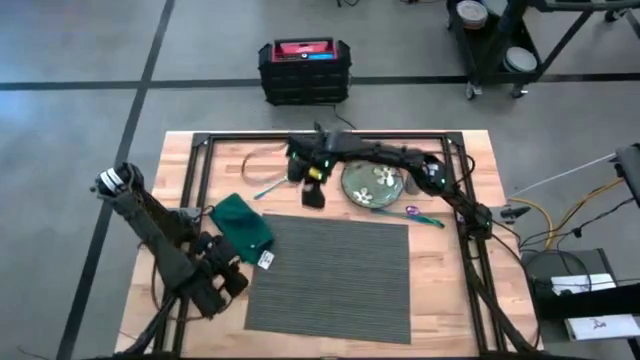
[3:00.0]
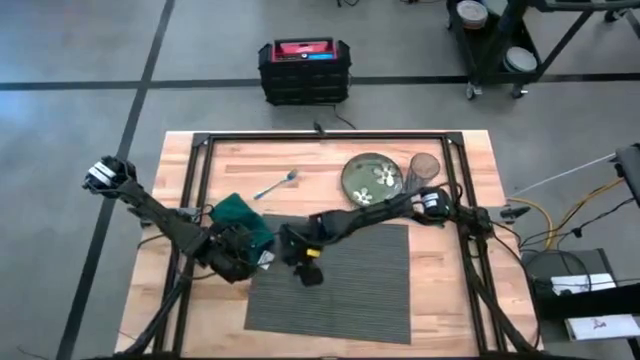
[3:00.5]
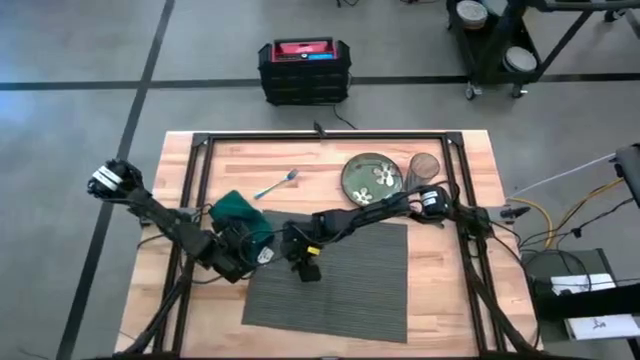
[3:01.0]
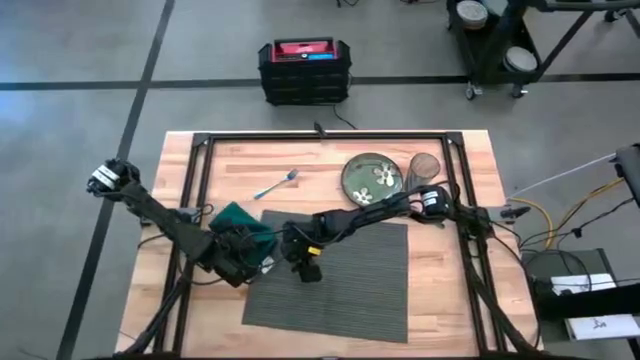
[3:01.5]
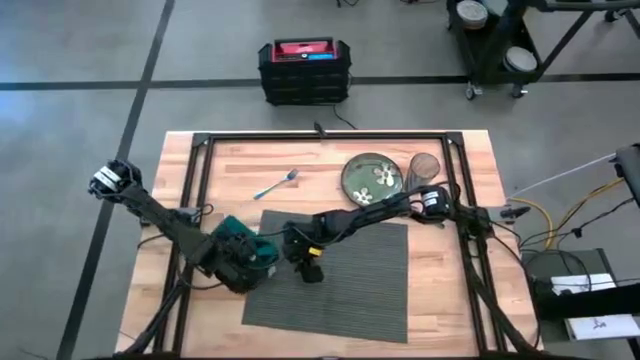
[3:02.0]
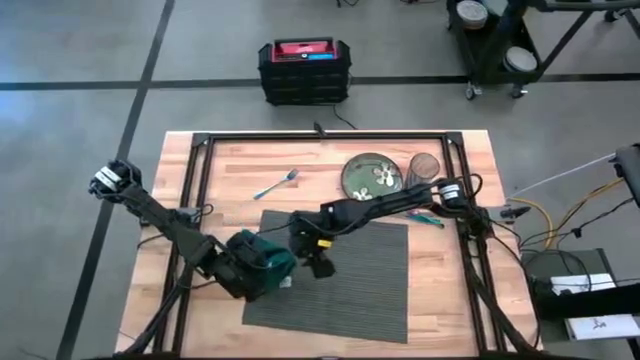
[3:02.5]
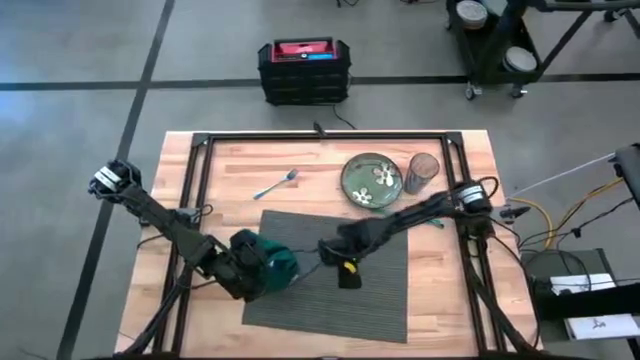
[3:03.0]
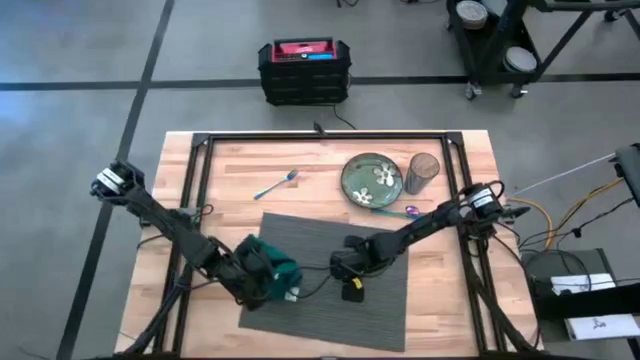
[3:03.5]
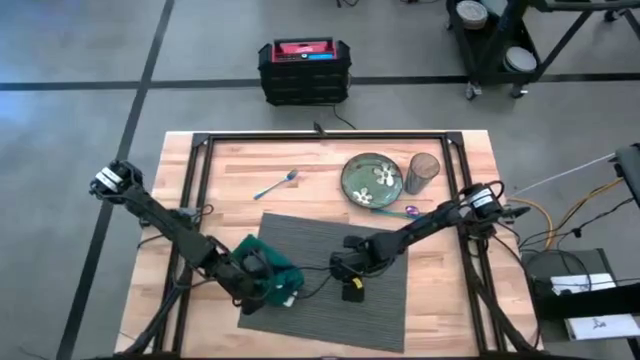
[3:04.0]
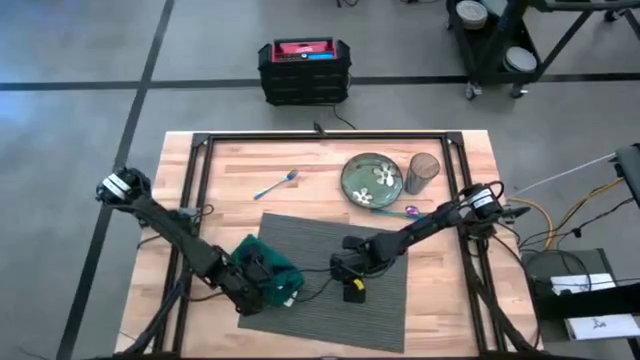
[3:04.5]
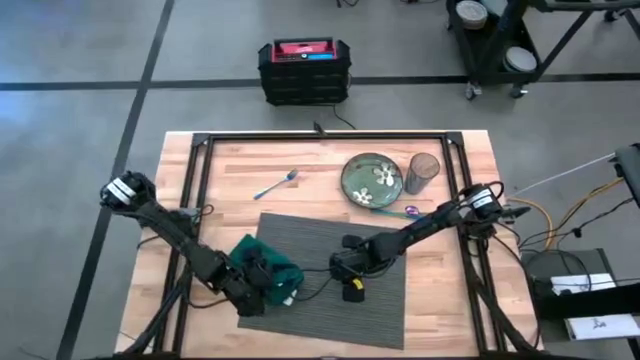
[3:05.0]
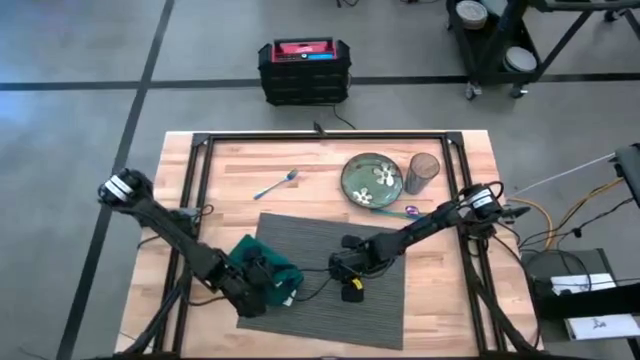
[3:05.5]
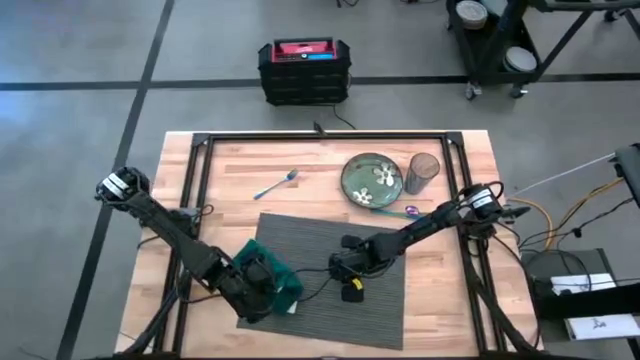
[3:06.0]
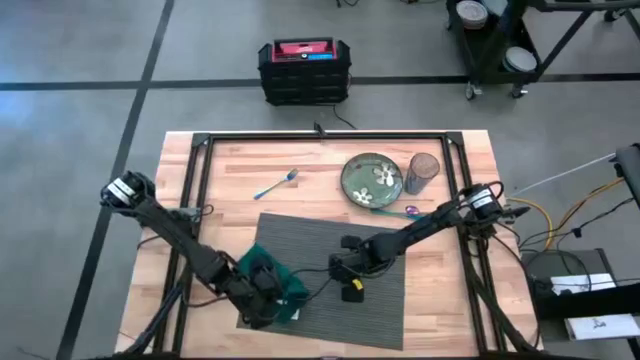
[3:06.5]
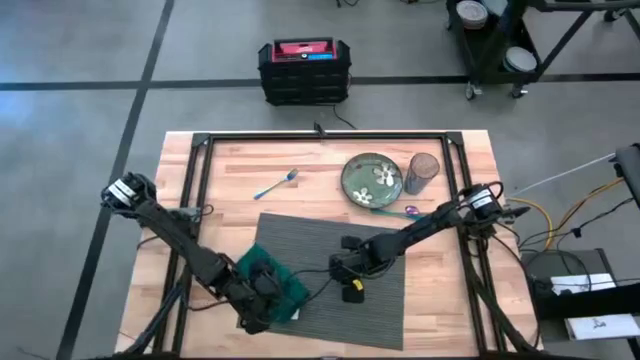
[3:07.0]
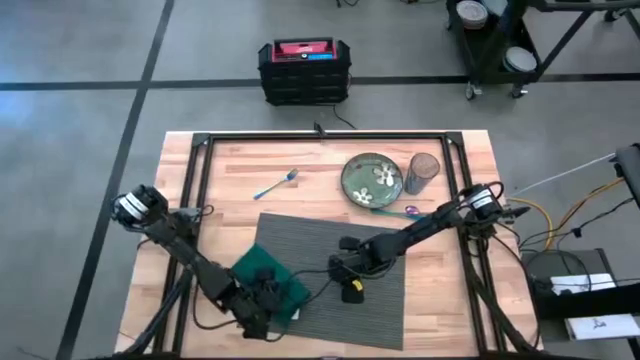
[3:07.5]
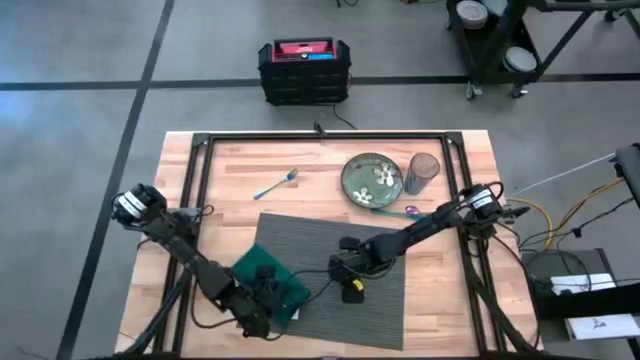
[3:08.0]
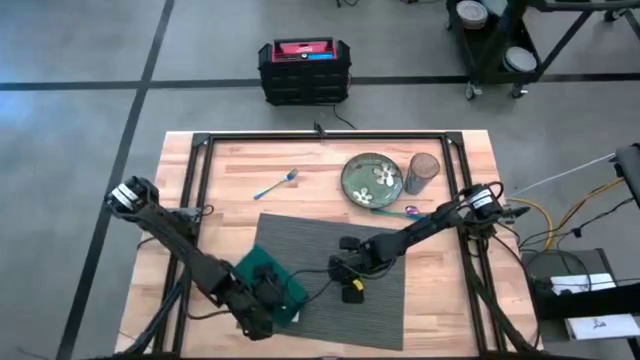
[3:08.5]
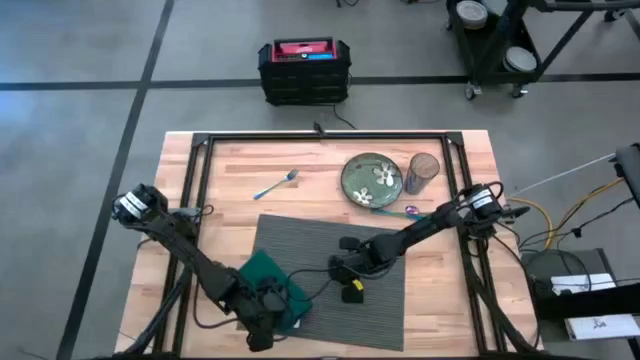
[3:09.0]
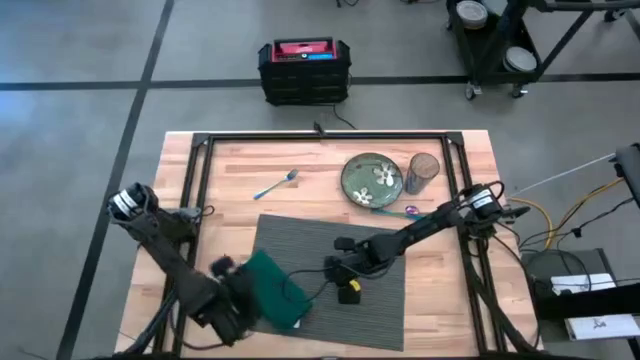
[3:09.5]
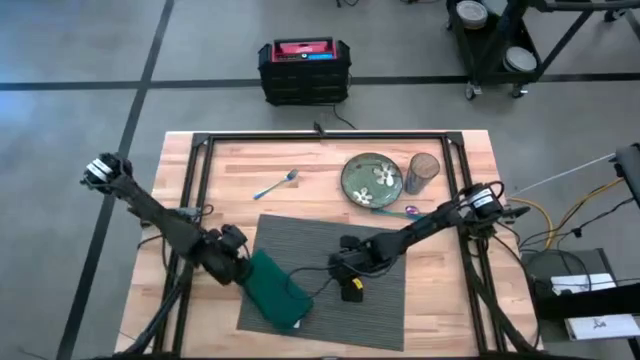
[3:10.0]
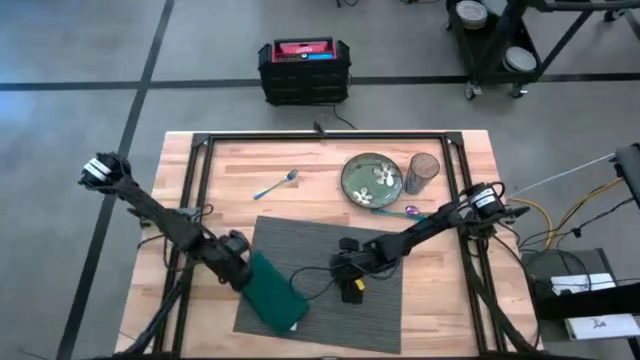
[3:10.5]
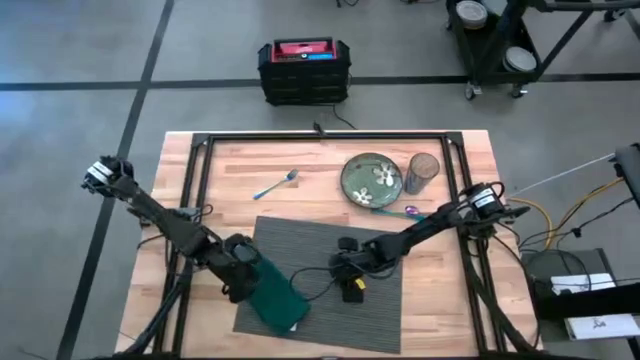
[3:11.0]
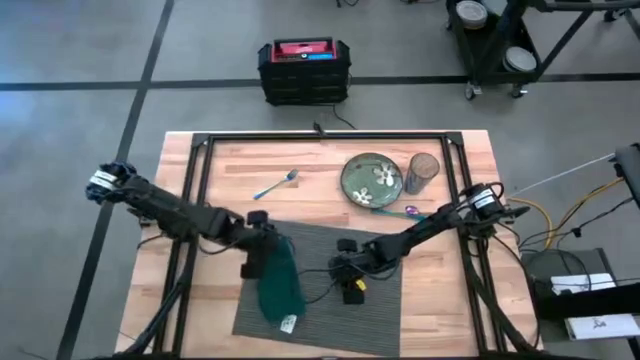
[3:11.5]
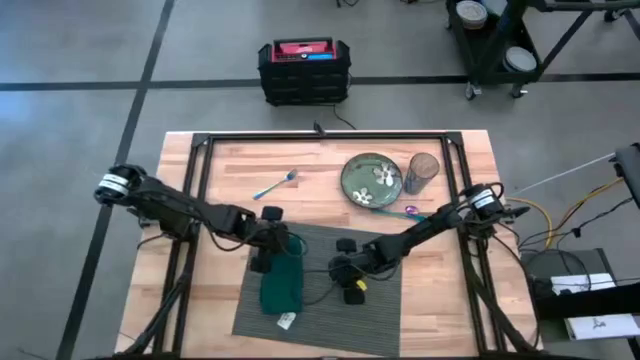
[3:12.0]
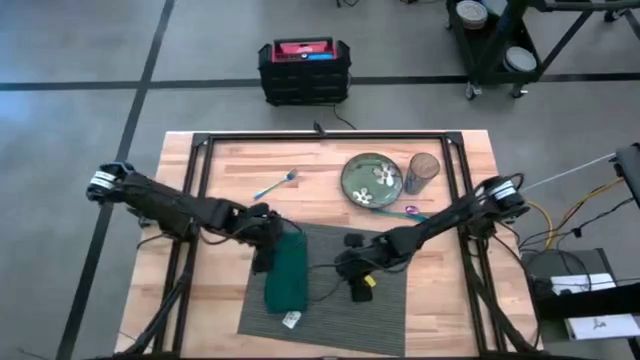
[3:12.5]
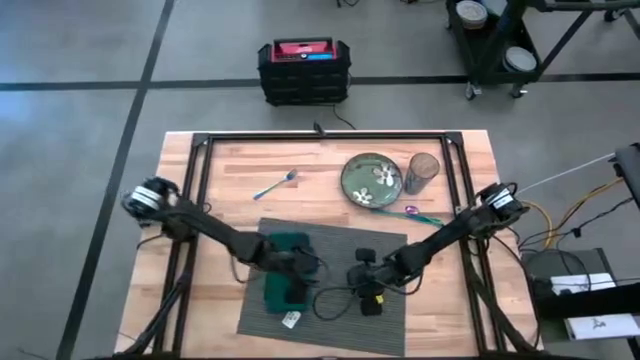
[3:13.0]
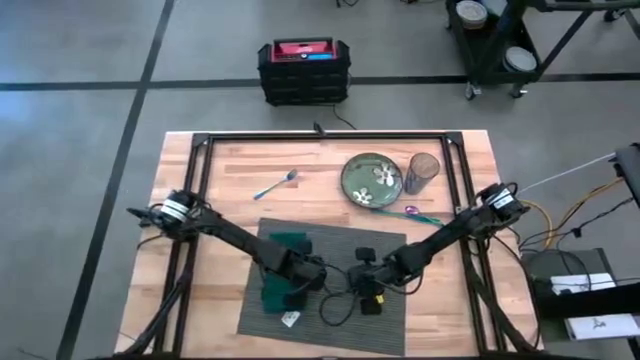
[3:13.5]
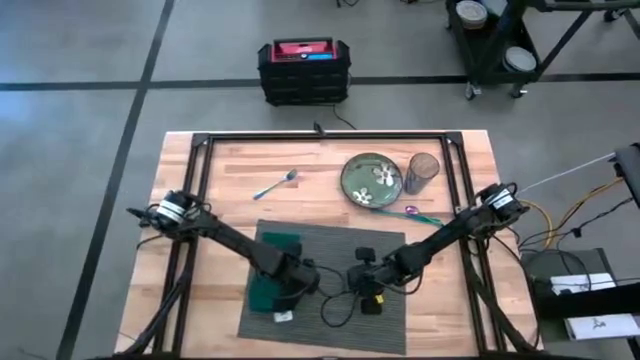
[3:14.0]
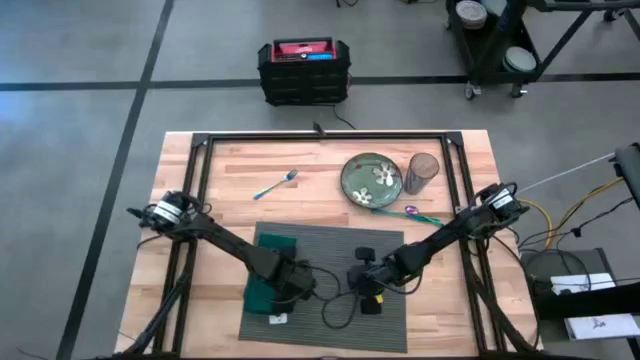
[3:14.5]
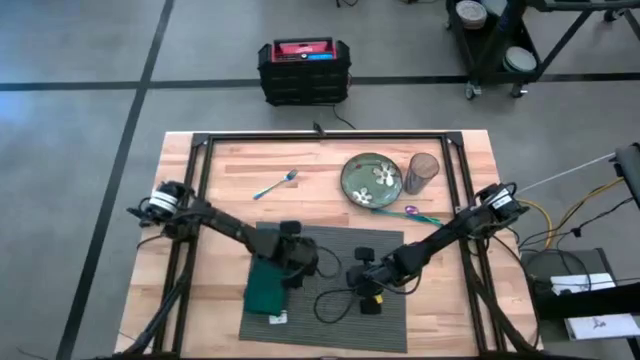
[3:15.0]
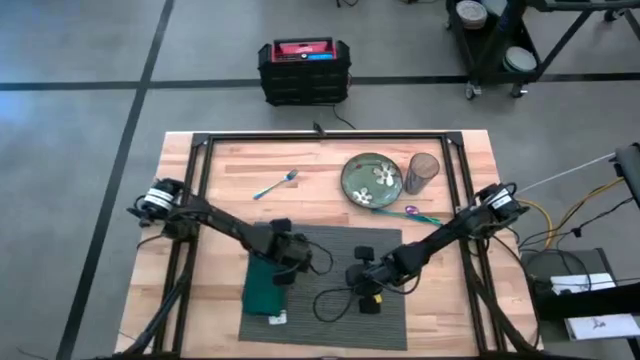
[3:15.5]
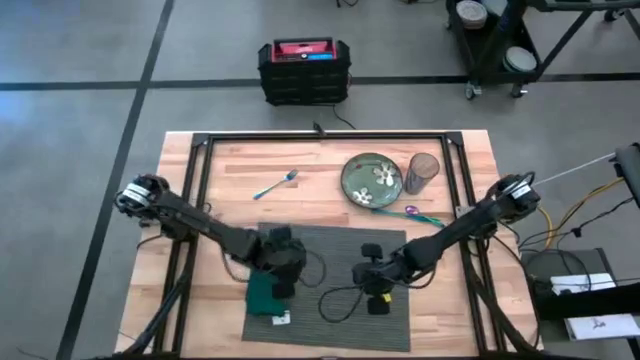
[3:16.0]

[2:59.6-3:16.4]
Task: Set table place
Put the green napkin on the gray place mat

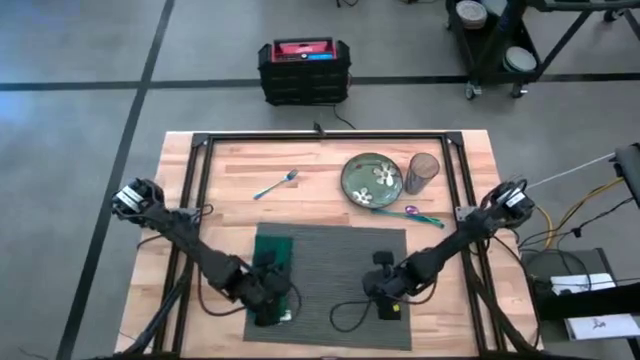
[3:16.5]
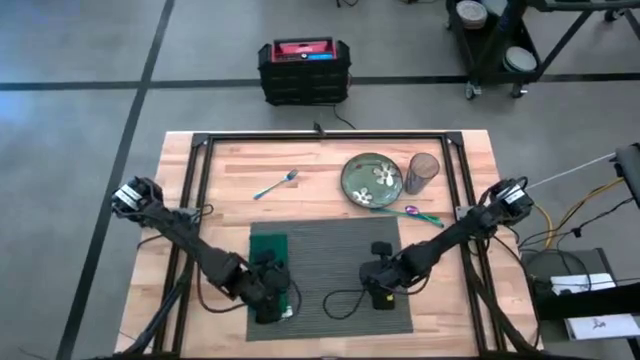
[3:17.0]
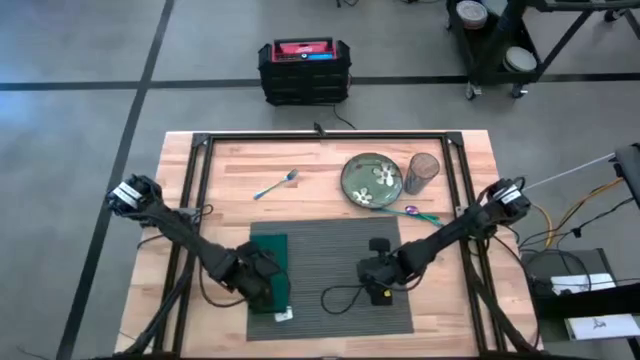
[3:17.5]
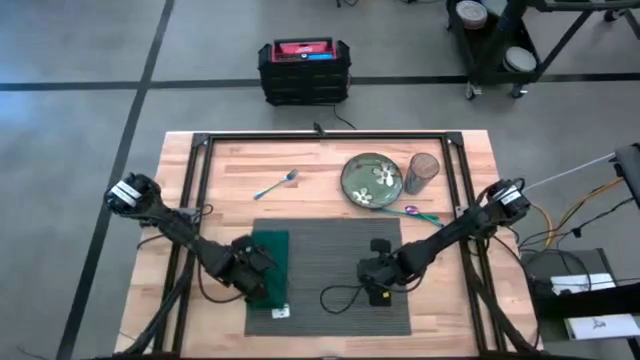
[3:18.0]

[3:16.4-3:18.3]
Adjust the gray place mat

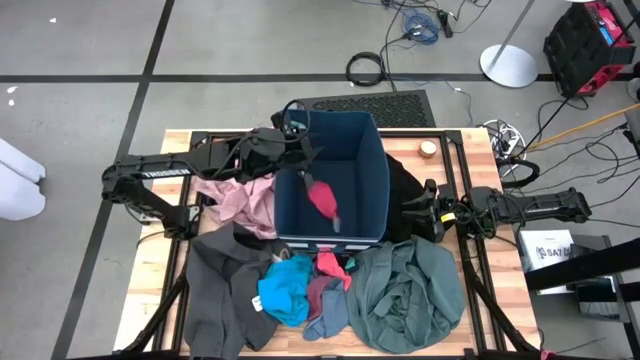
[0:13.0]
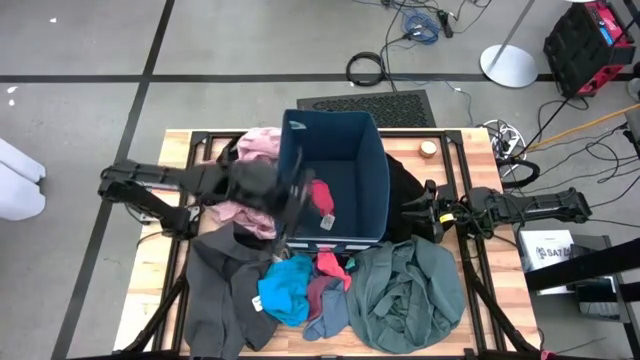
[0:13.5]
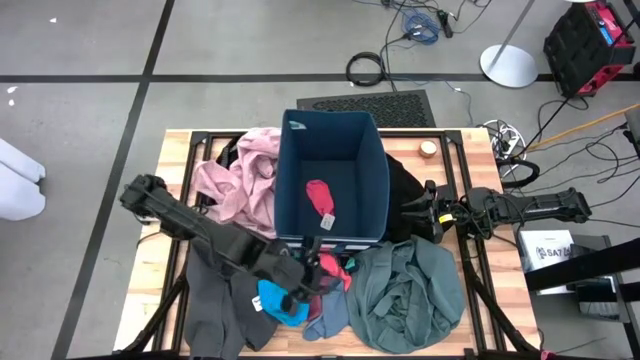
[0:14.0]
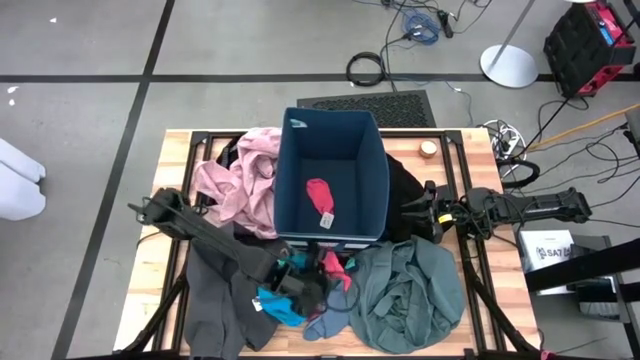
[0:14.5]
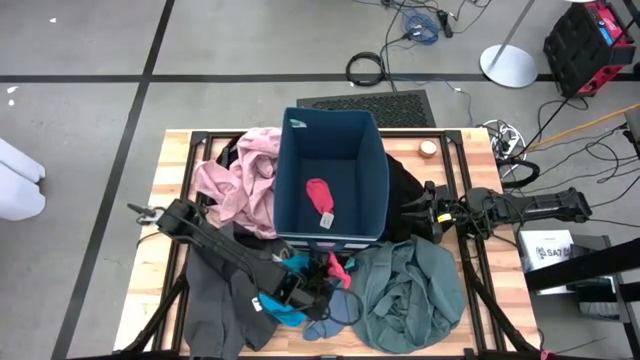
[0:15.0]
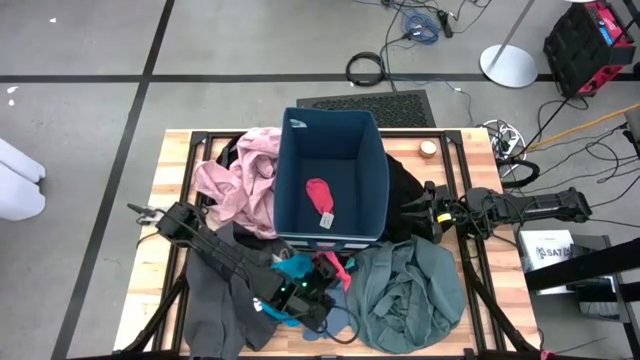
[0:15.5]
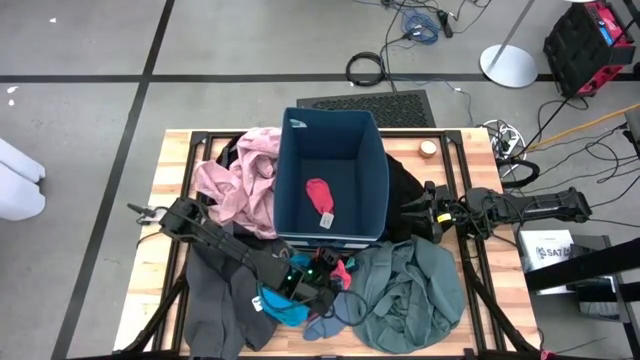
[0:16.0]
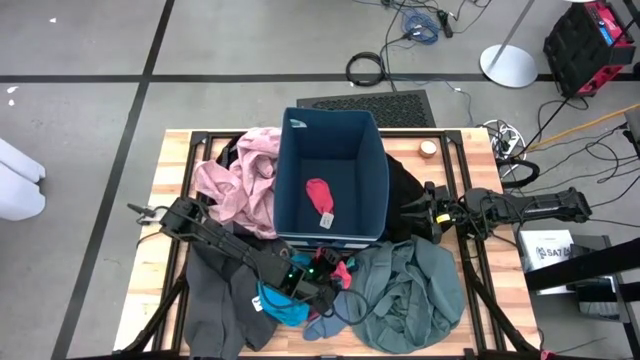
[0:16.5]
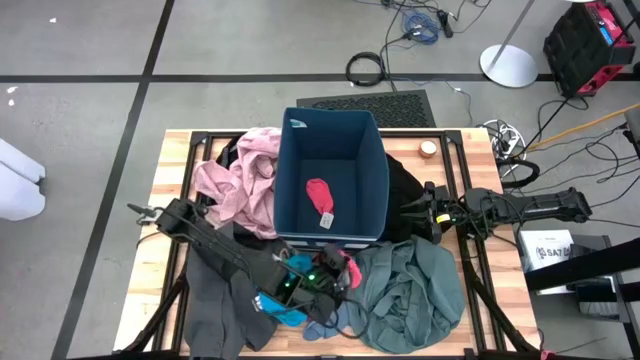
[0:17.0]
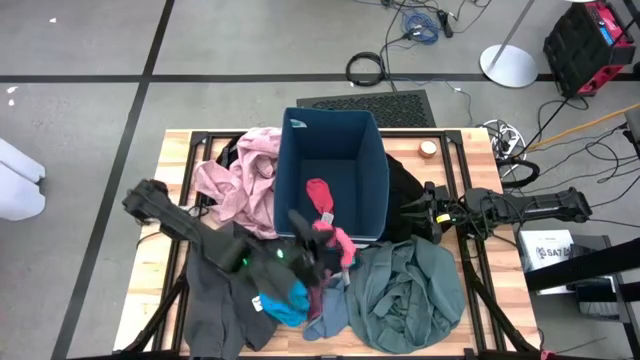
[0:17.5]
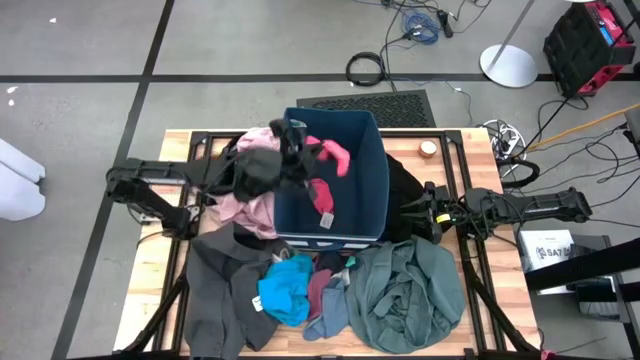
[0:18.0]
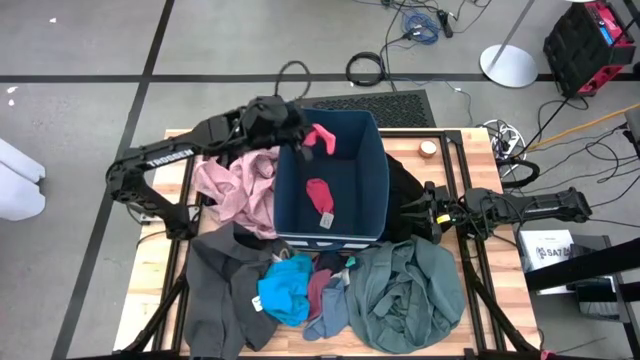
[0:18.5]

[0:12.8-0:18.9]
Task: Sort clothes
Put the pink sock into the blue laundry organizer
